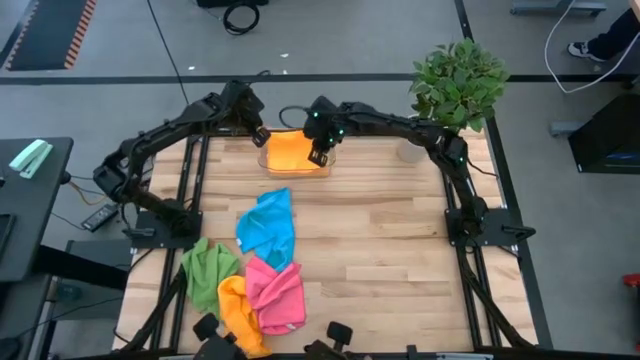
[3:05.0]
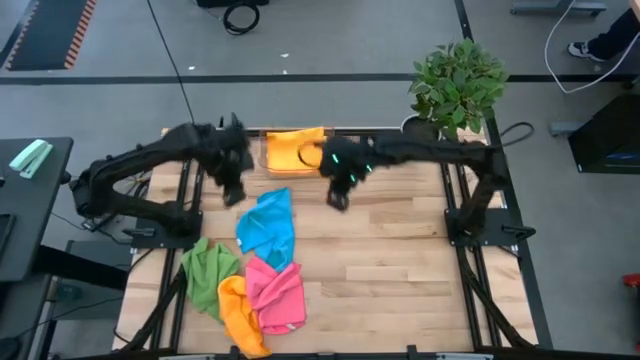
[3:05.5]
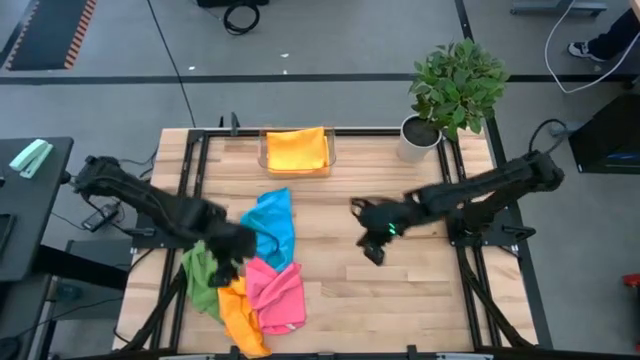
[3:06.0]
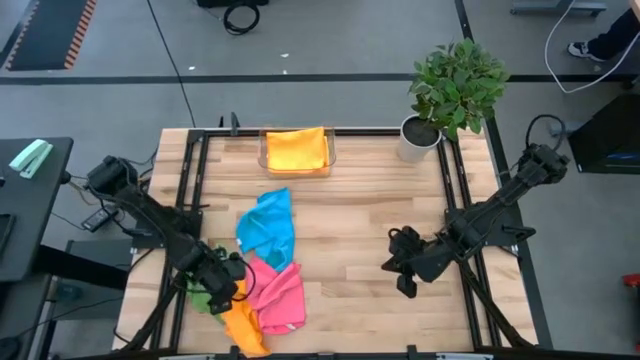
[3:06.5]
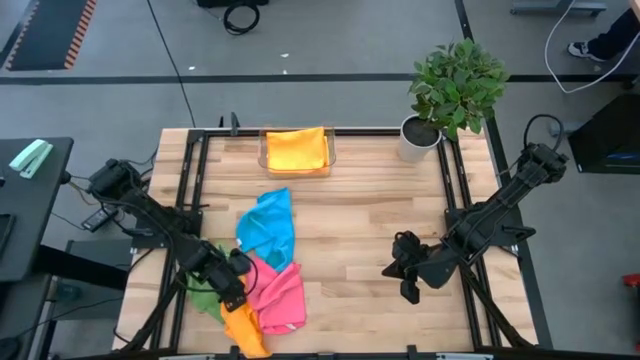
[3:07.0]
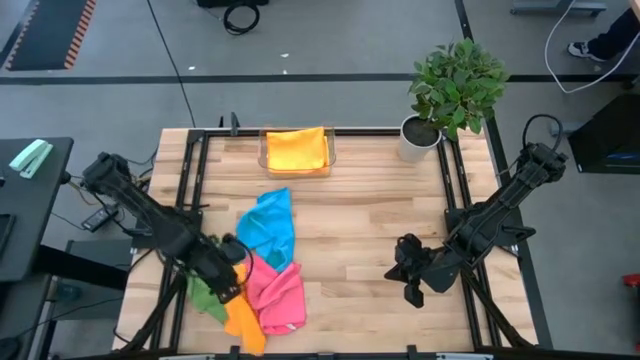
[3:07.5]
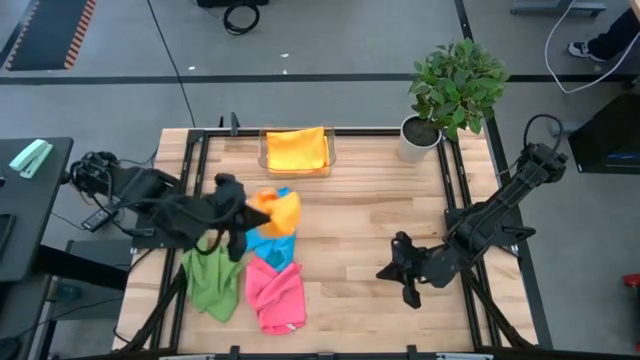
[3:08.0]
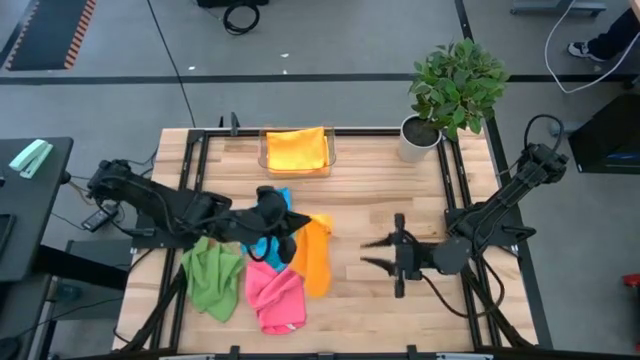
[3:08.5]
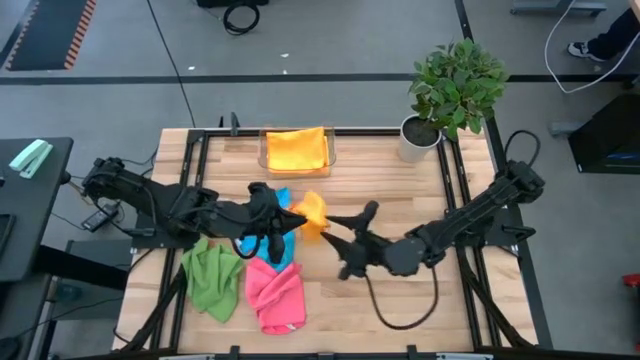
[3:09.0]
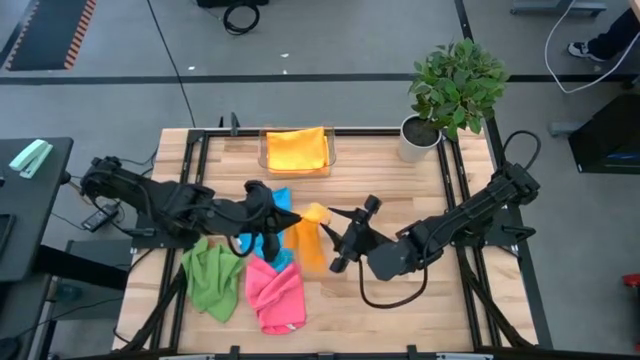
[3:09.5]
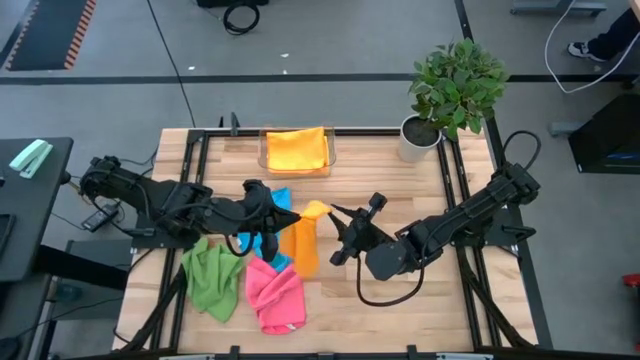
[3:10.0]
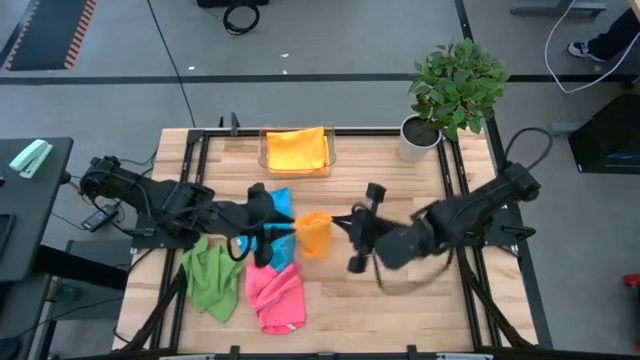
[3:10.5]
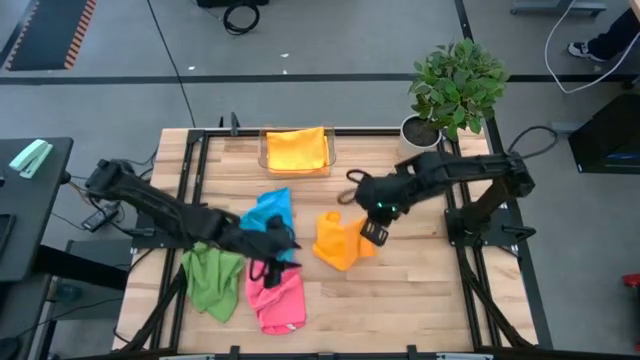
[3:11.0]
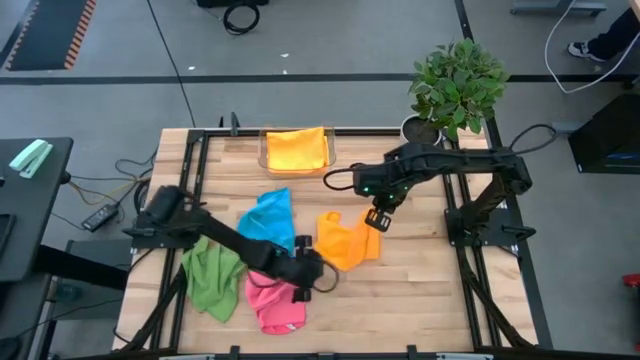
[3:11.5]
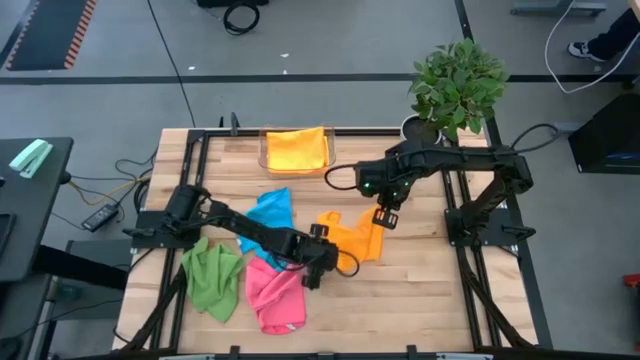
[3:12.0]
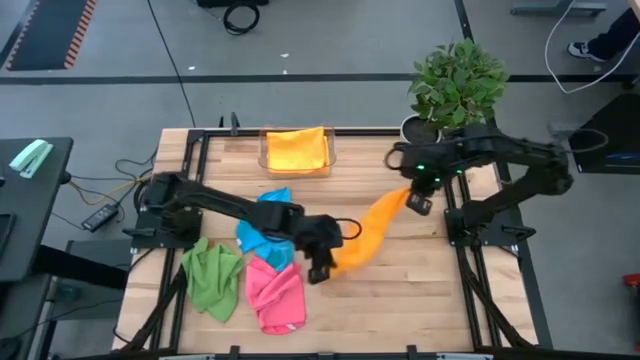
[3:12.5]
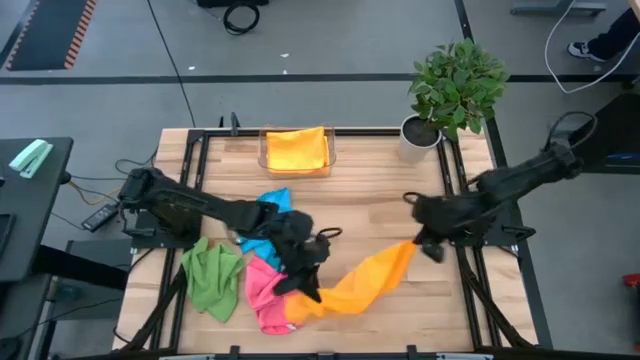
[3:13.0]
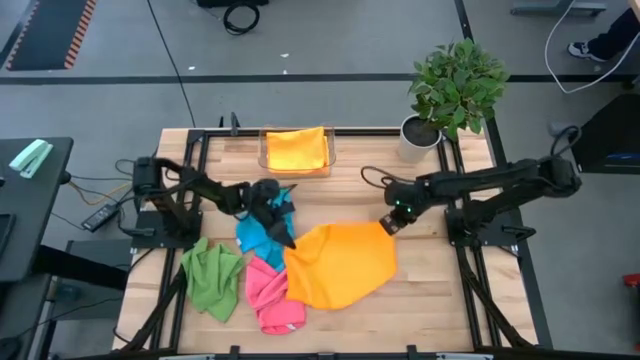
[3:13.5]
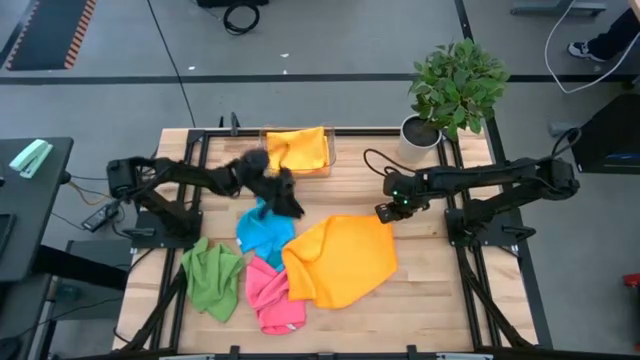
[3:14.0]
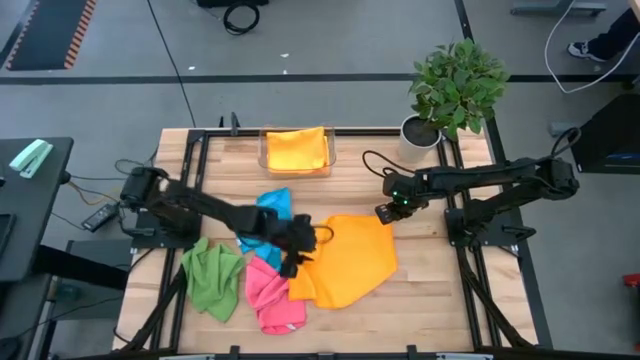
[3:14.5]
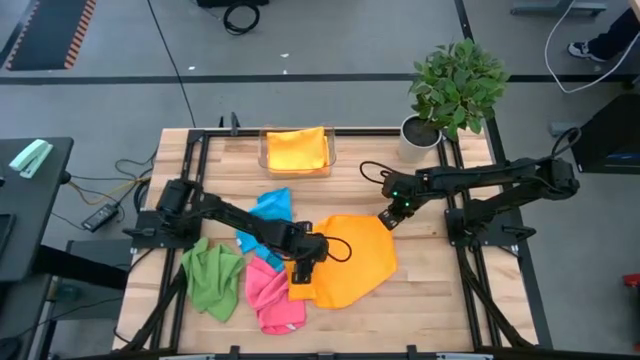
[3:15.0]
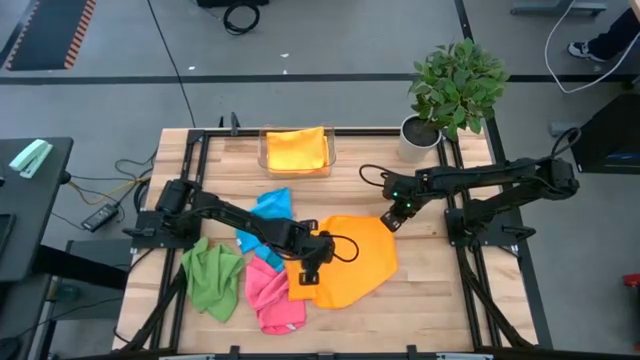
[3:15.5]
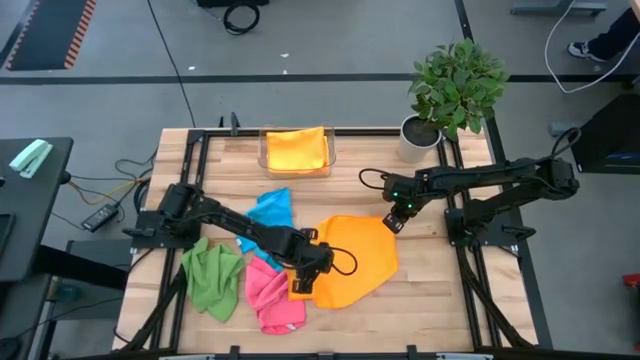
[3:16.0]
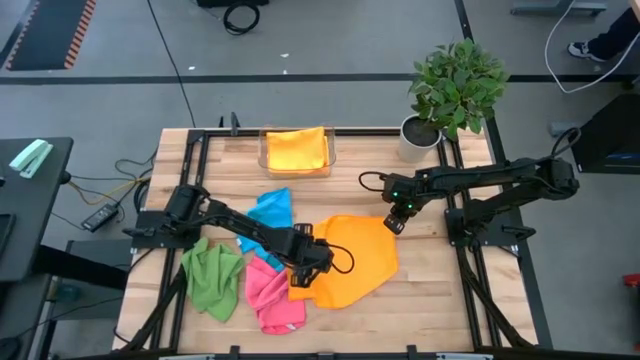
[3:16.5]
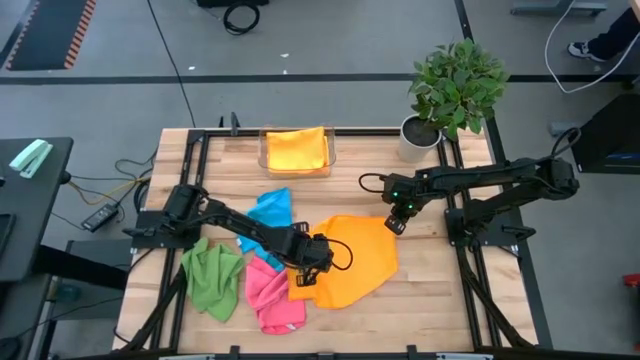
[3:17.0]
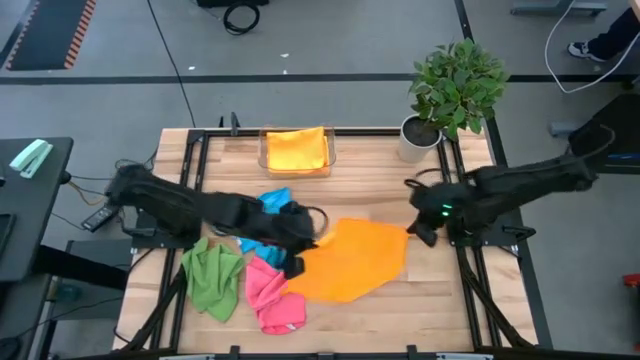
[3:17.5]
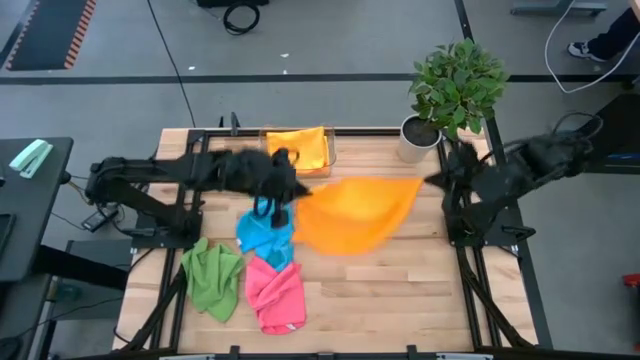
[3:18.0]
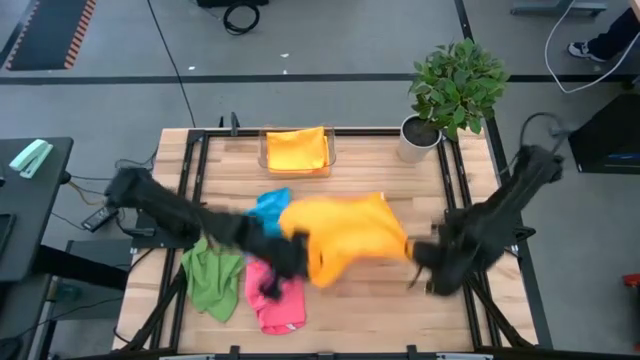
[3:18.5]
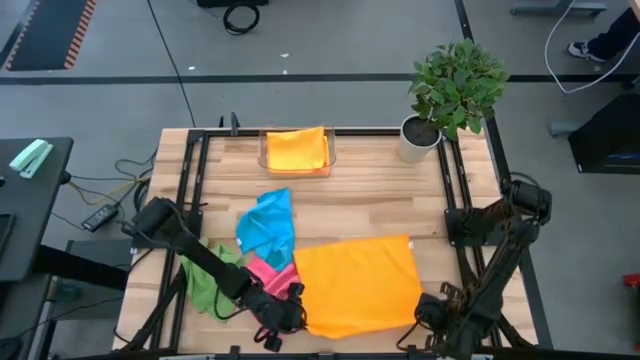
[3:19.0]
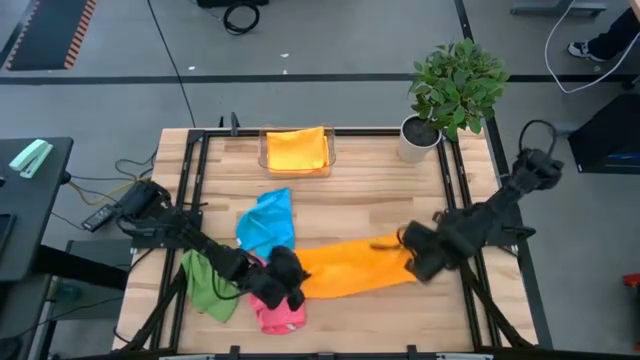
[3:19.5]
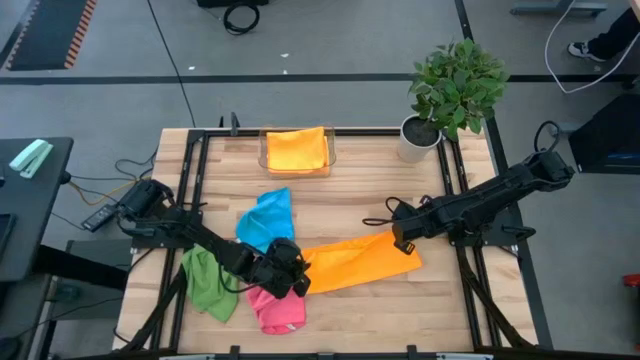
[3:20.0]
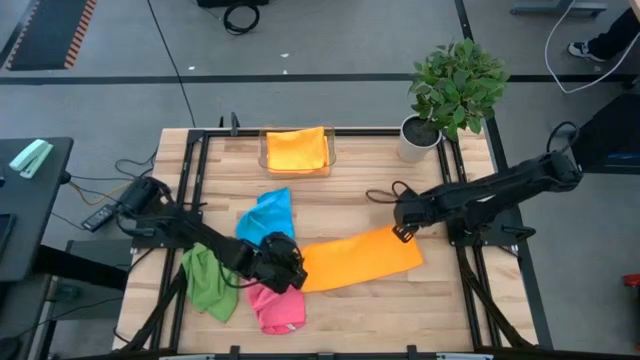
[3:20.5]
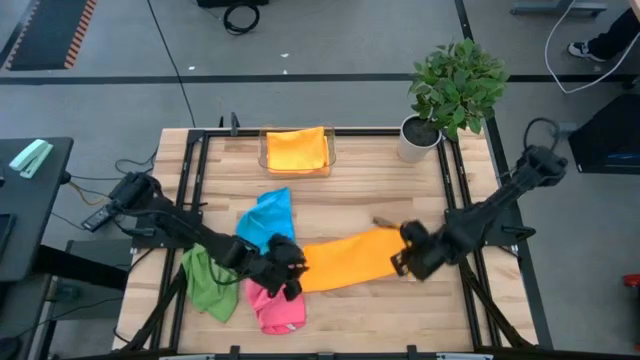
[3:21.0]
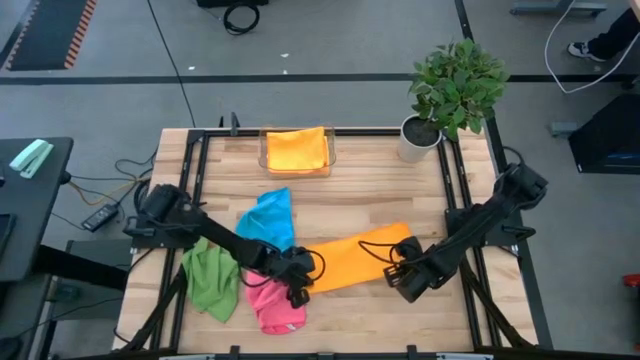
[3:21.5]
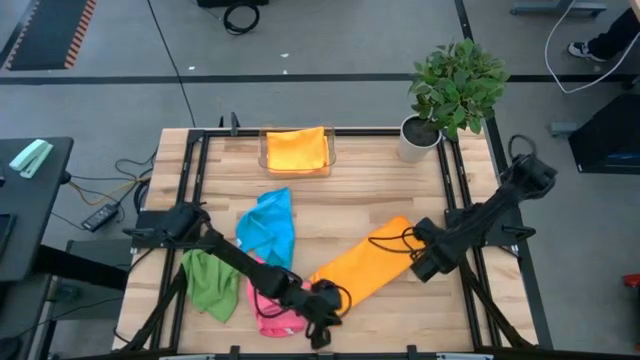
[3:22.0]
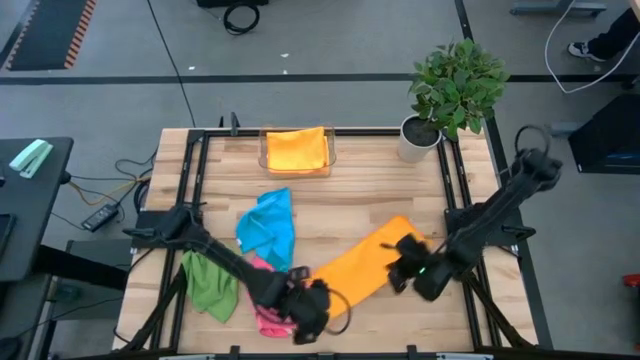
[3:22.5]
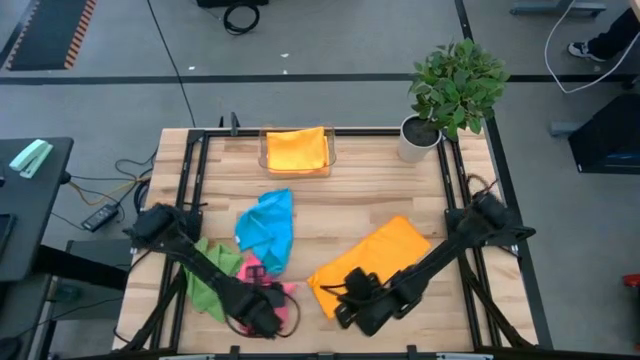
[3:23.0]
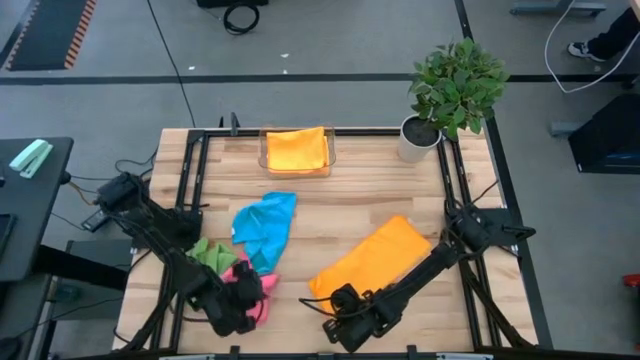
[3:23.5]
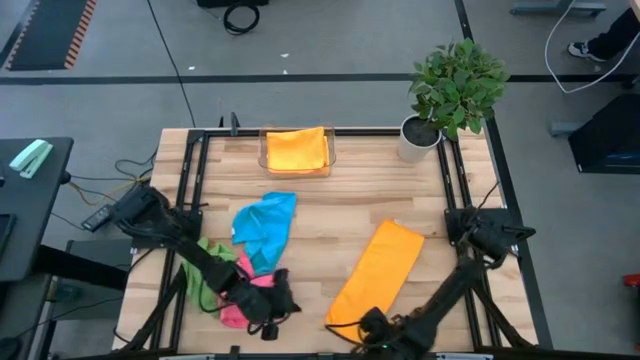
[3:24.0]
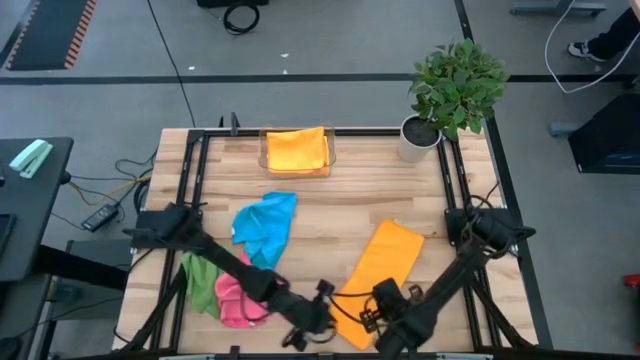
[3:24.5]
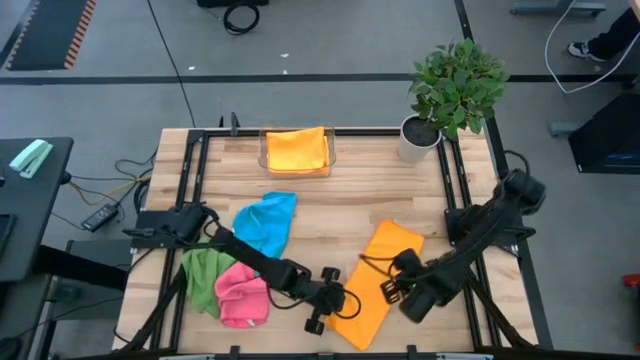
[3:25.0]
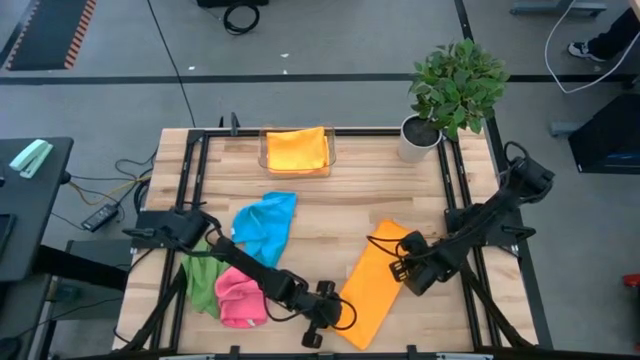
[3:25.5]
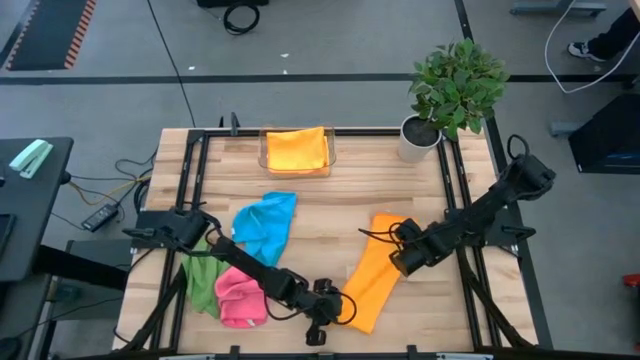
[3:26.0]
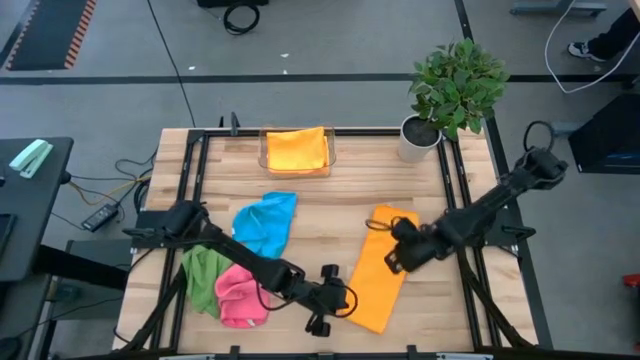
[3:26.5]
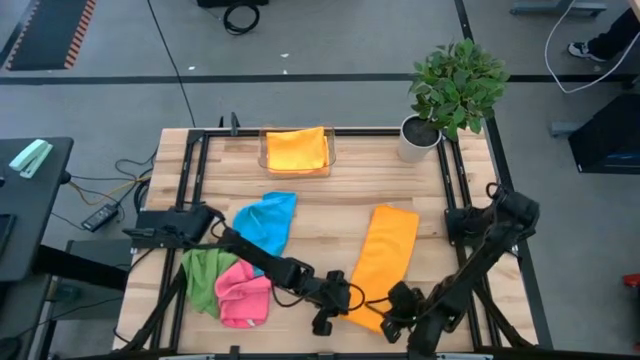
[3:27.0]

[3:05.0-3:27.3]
Task: Fold microfiber towels
Fold the orange microfiber towel
